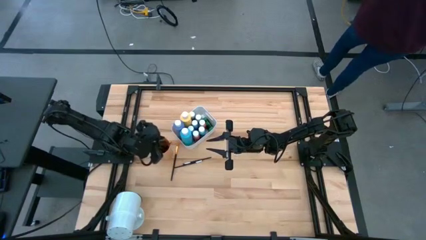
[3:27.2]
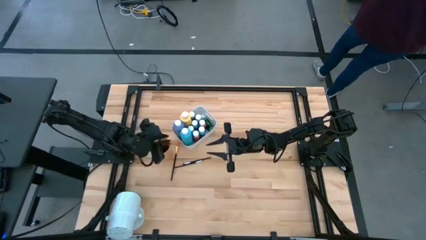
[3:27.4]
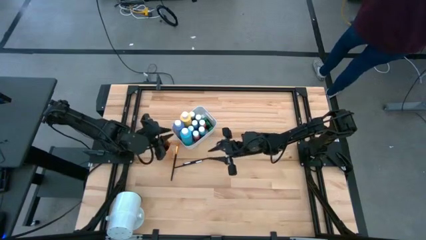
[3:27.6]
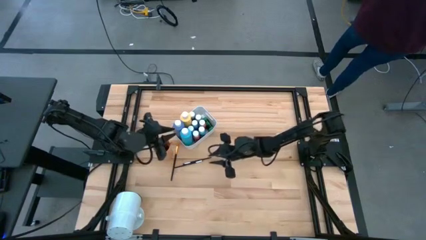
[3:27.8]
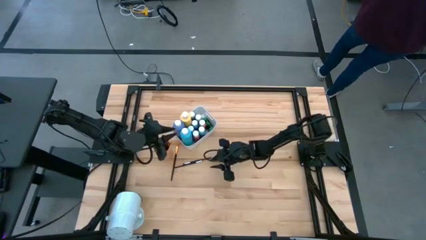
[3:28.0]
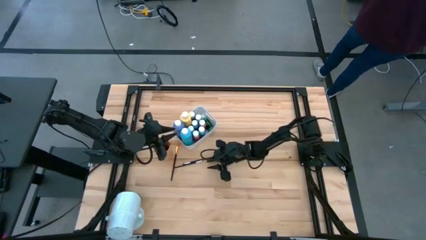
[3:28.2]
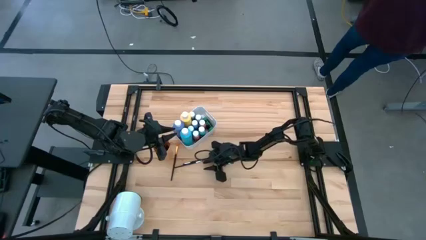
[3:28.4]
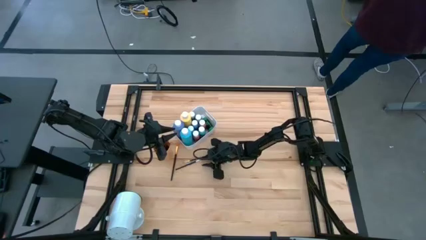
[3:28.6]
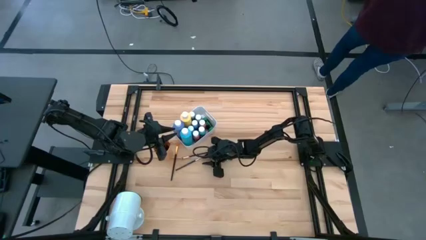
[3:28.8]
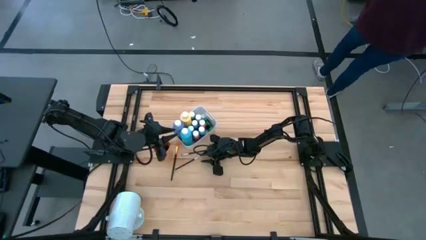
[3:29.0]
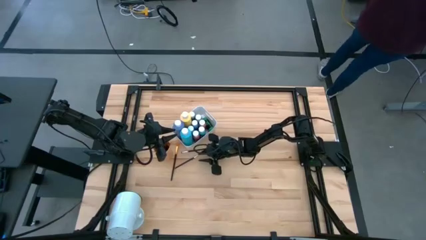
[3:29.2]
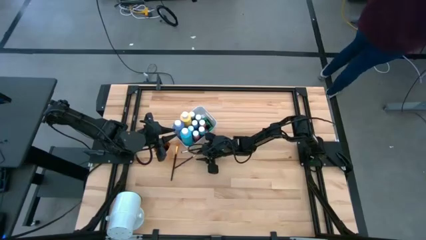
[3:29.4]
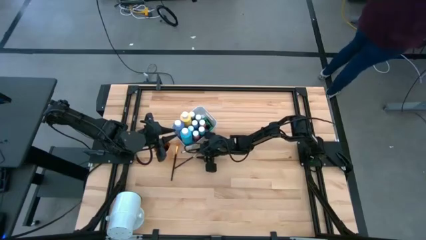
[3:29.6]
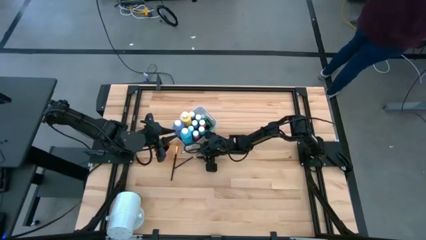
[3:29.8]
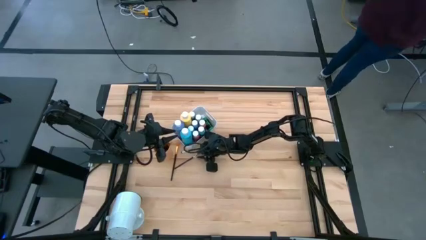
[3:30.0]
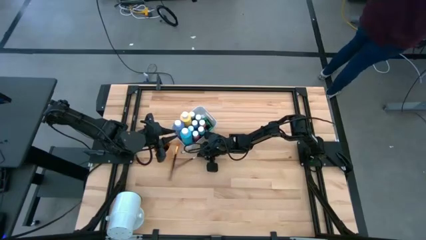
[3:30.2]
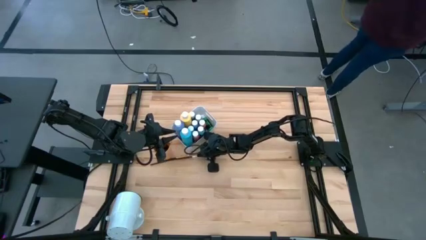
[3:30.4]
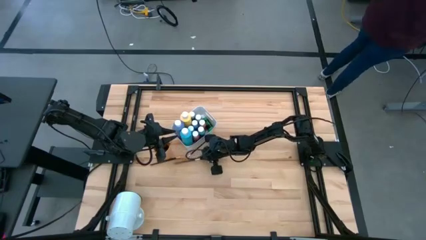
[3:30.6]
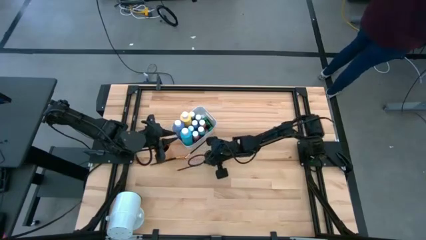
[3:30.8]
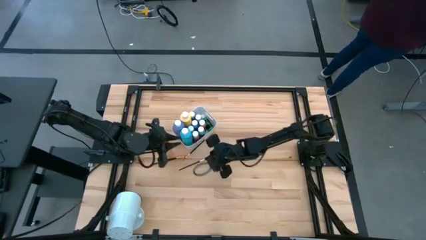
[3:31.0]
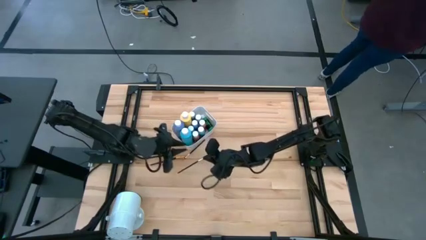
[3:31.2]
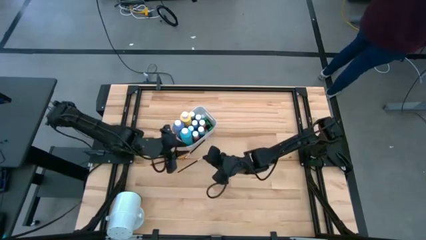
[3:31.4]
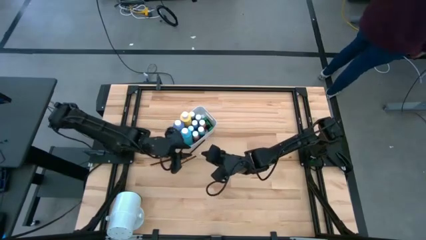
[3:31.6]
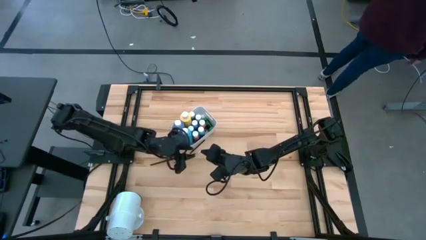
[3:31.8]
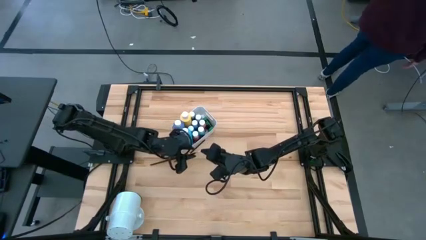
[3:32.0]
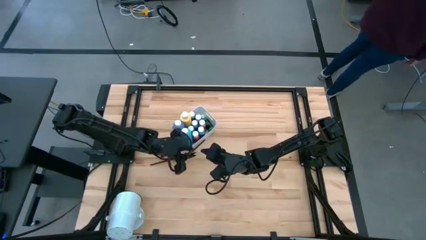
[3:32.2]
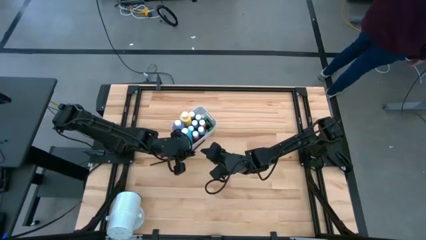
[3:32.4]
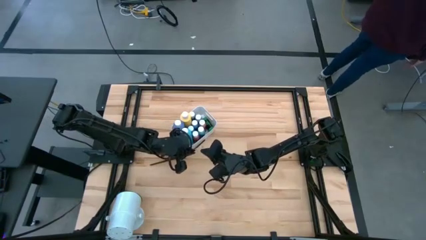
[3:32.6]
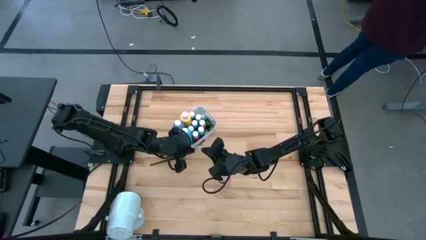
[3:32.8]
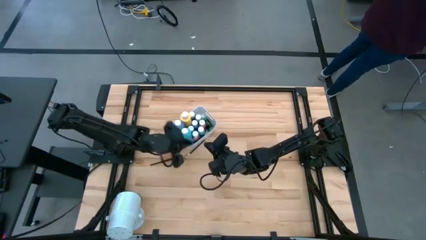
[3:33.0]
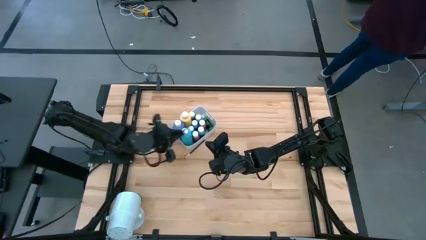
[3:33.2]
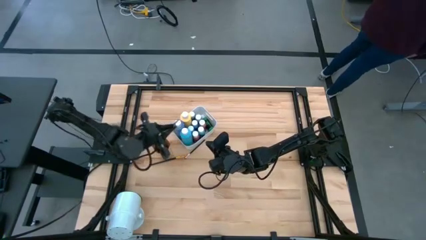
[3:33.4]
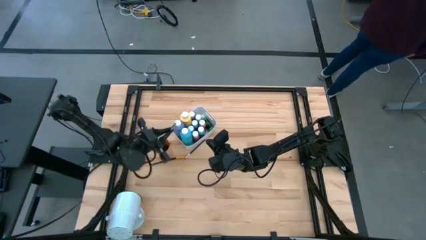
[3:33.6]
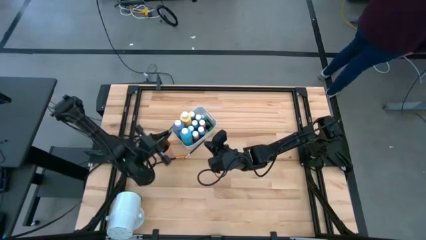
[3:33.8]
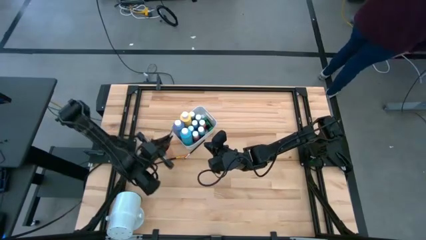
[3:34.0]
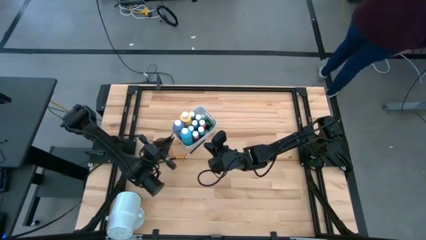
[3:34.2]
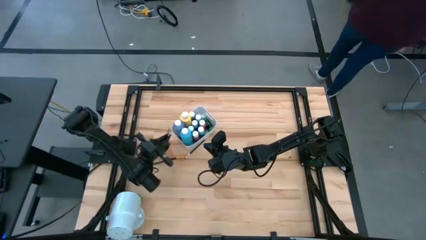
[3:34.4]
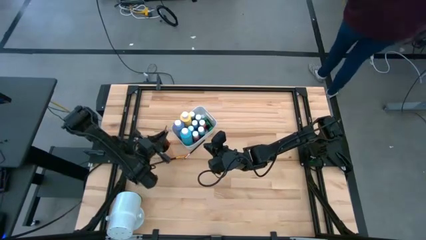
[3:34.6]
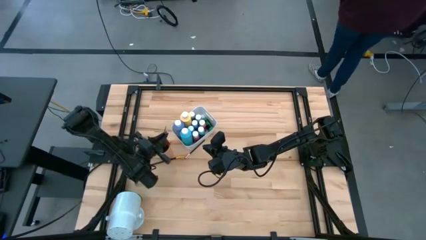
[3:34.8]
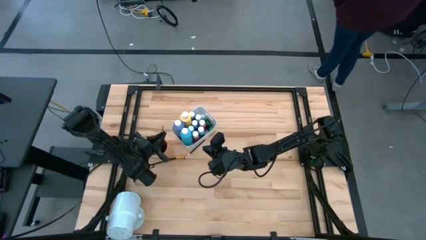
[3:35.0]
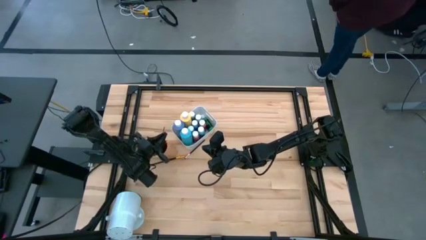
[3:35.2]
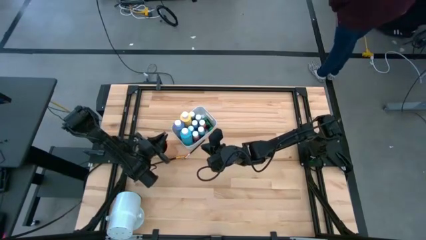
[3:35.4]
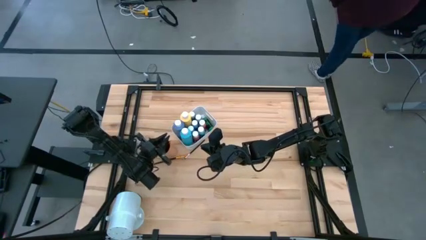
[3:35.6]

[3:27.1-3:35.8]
Task: Pick & Place Paint Supplies
Put the bottom black silver paintbrush into the orange cup

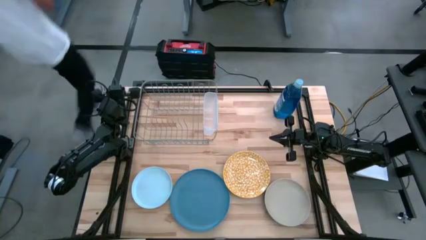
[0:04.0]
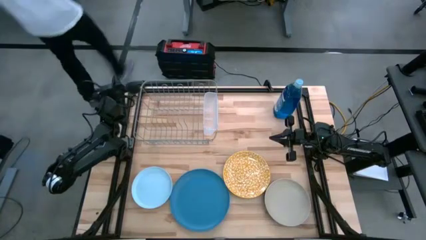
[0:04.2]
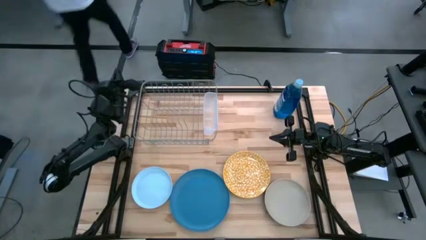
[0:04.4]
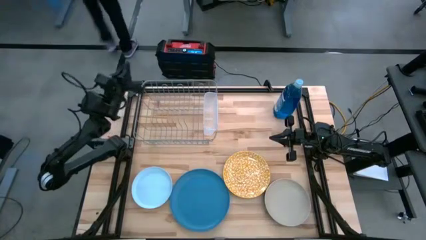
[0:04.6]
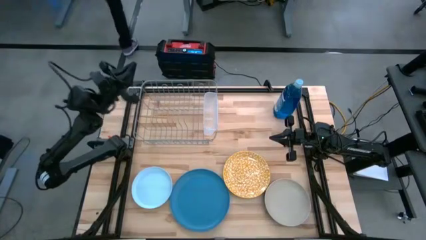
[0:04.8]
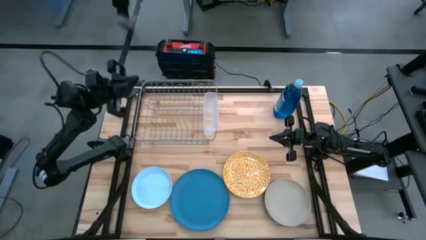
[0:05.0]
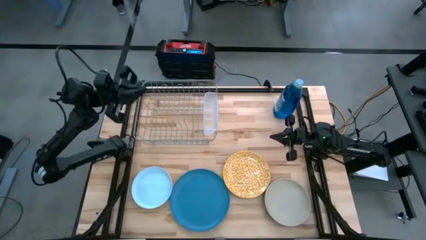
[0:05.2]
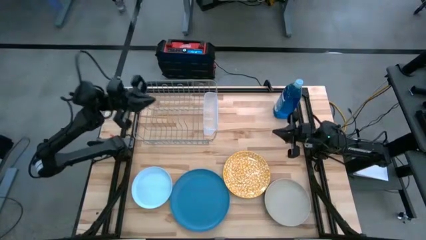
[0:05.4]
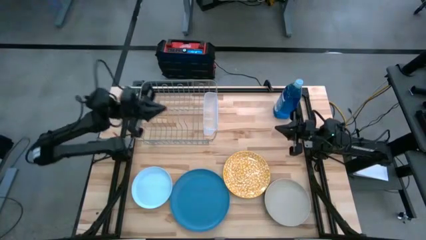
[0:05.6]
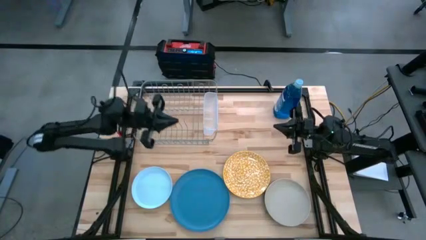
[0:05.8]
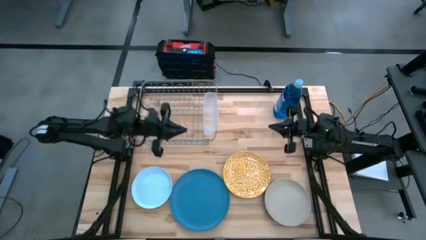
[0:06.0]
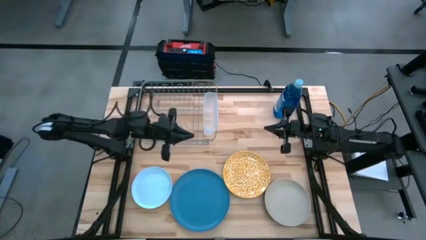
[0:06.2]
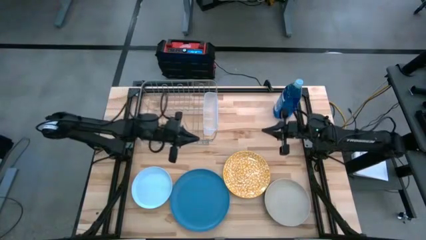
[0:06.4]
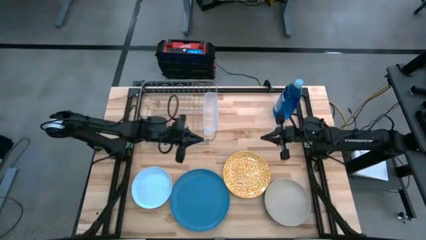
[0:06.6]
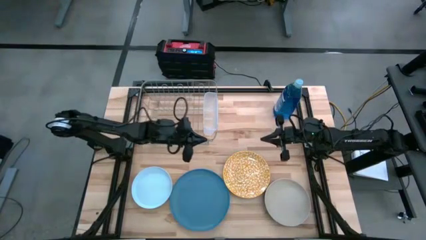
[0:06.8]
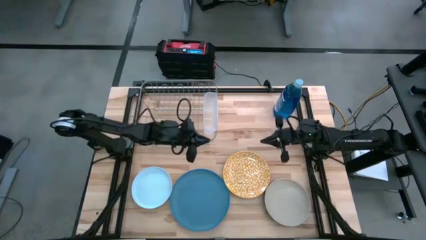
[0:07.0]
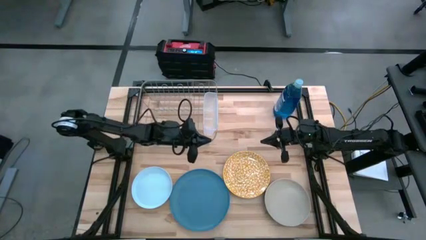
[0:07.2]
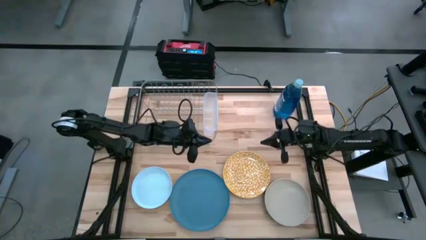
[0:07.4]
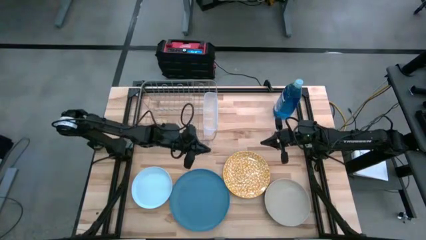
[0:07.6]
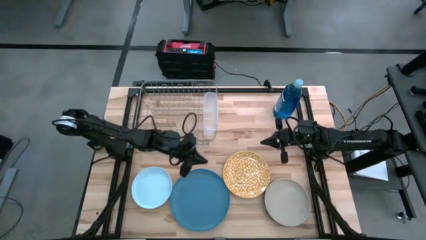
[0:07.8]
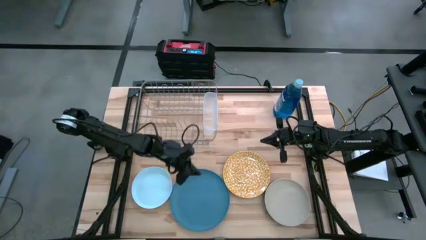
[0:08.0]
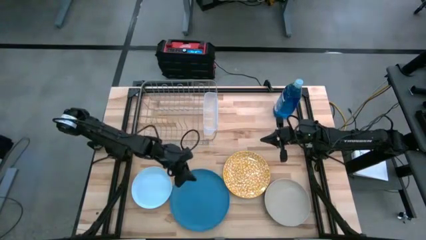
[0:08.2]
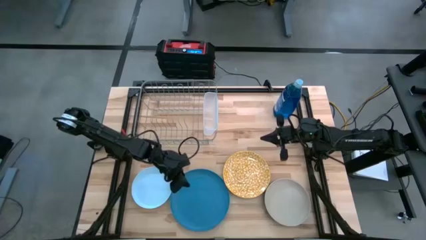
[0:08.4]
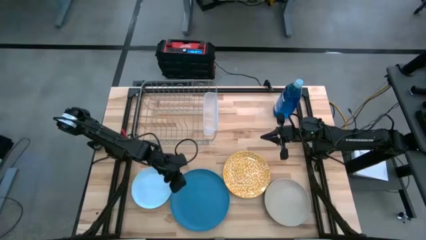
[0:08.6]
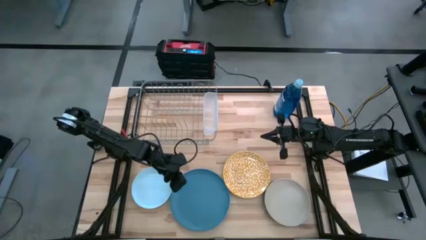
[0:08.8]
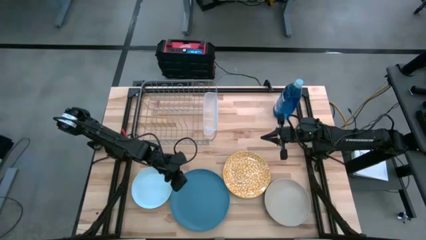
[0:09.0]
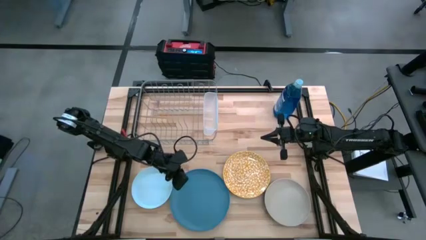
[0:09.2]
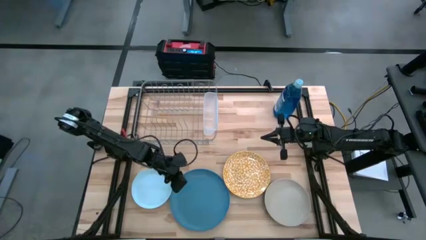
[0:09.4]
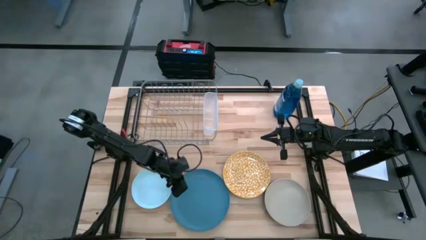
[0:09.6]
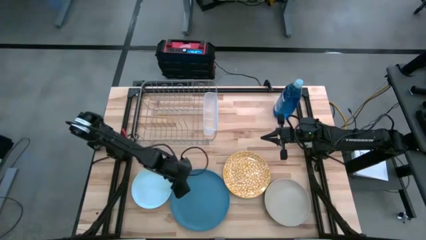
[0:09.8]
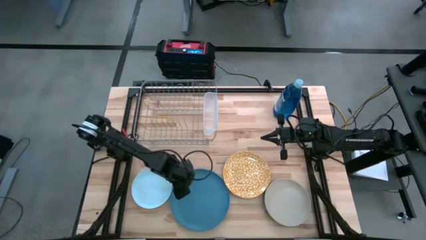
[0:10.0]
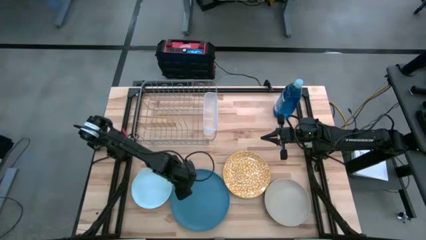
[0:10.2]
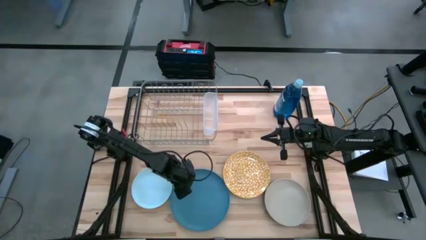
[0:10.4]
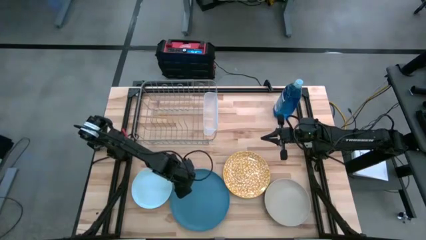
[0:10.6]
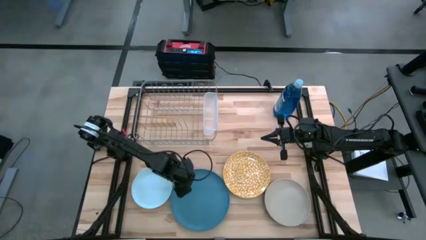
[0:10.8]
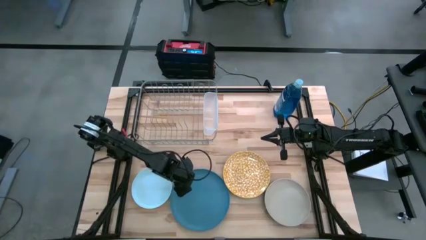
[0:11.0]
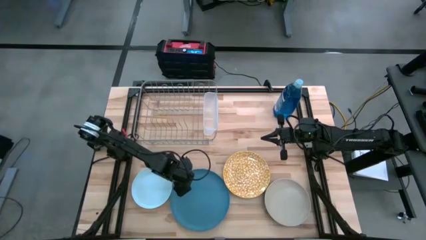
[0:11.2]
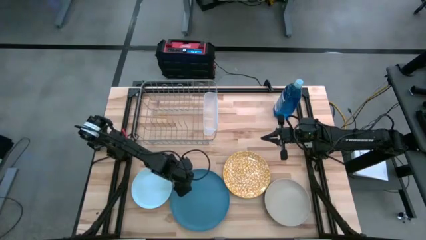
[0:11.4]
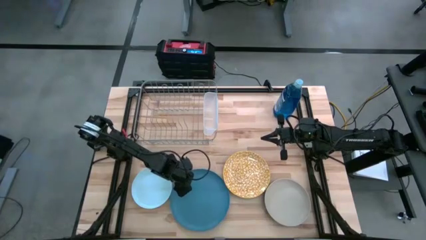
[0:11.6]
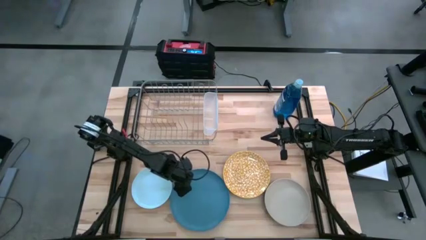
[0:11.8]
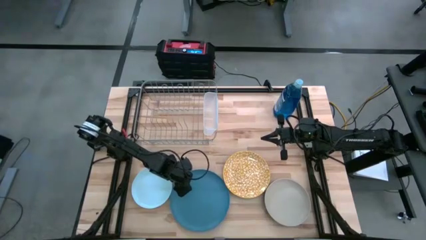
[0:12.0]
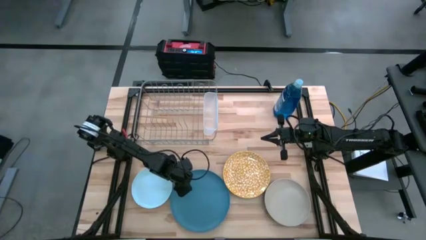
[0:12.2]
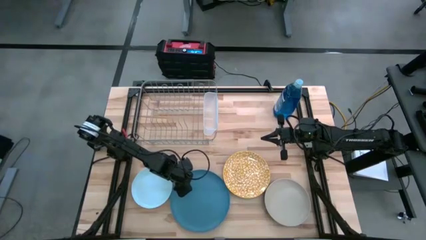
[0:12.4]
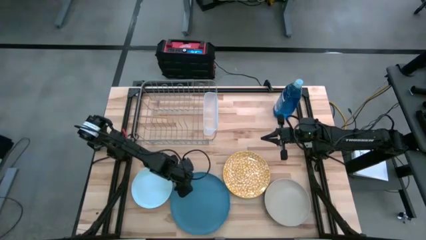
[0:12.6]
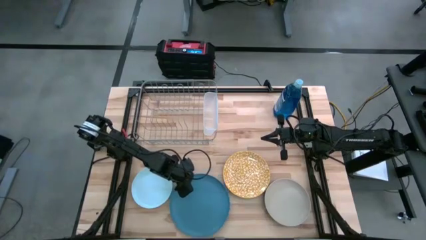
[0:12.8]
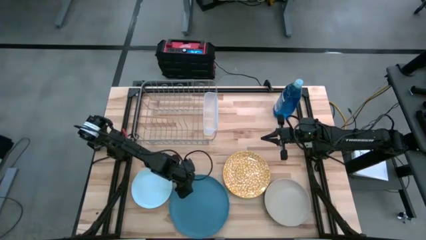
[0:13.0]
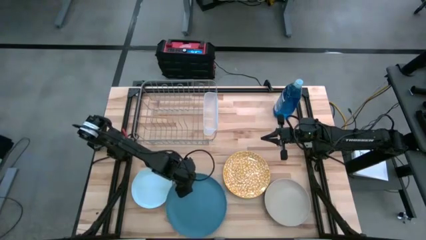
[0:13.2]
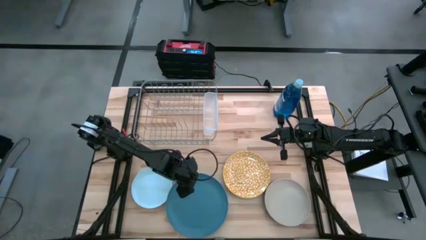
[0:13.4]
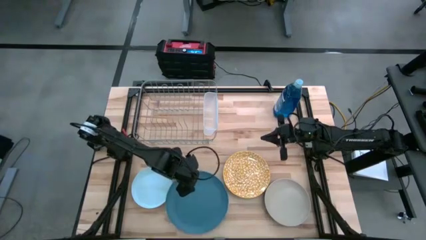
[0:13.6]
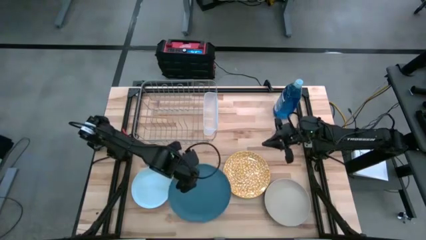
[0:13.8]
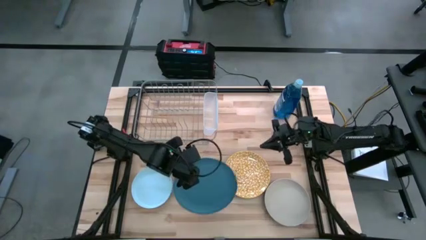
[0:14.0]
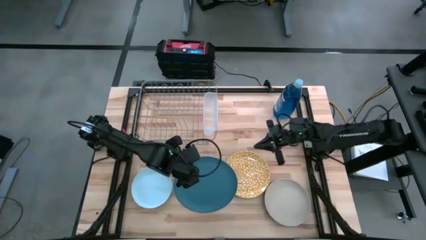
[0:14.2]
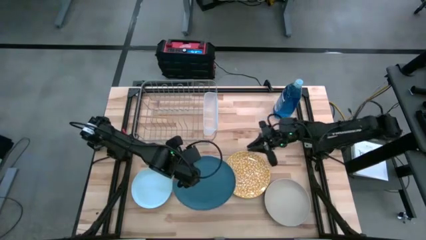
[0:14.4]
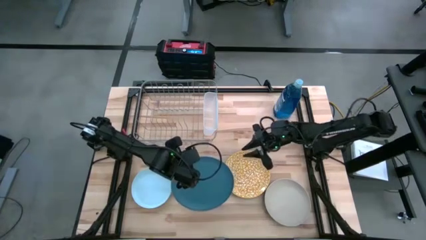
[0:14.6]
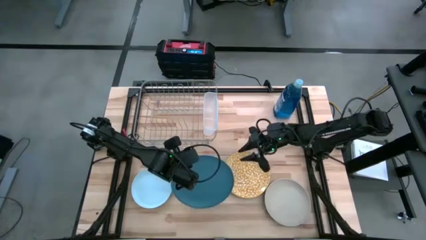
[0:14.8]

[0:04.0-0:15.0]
Task: Sort dishes
Put the blue plate in the dish rack
